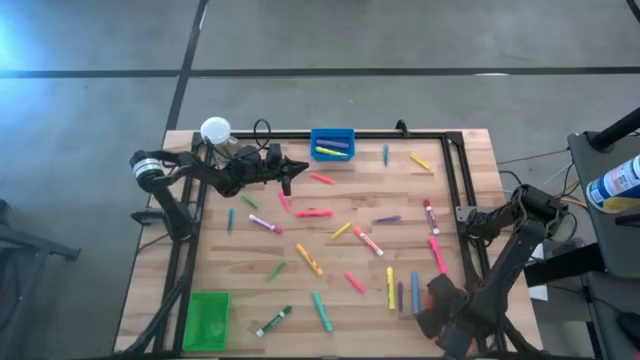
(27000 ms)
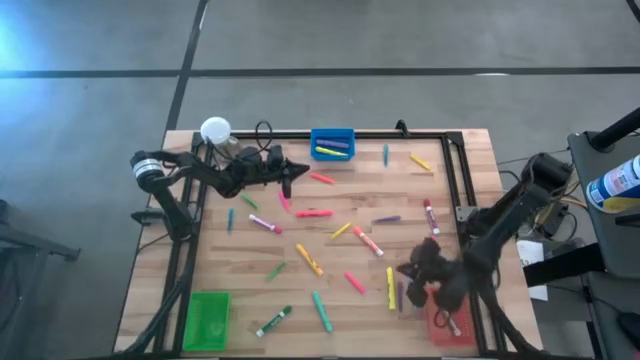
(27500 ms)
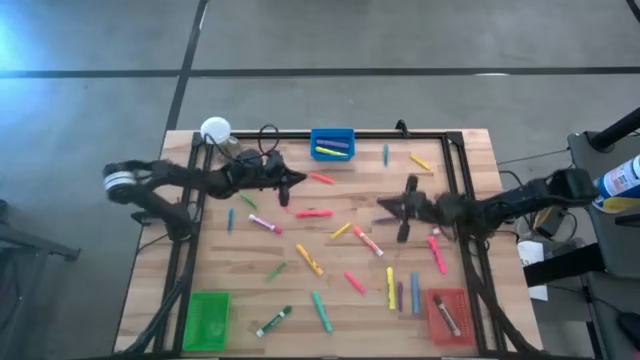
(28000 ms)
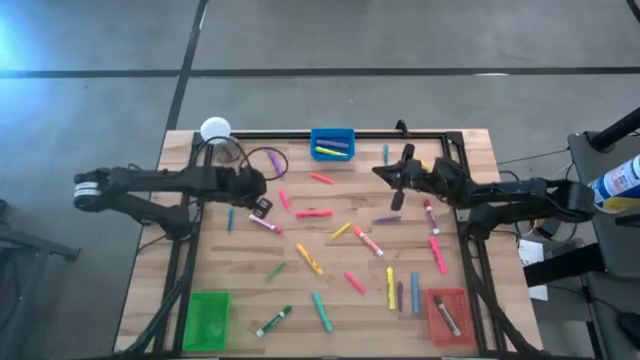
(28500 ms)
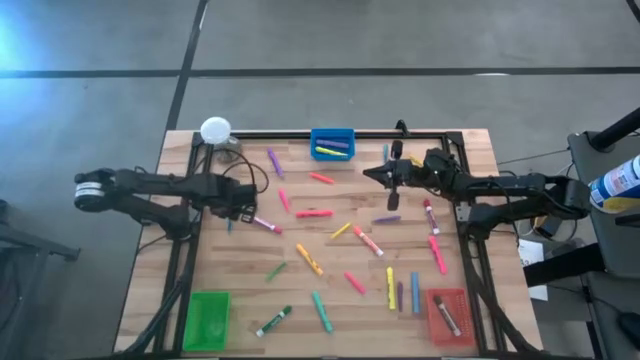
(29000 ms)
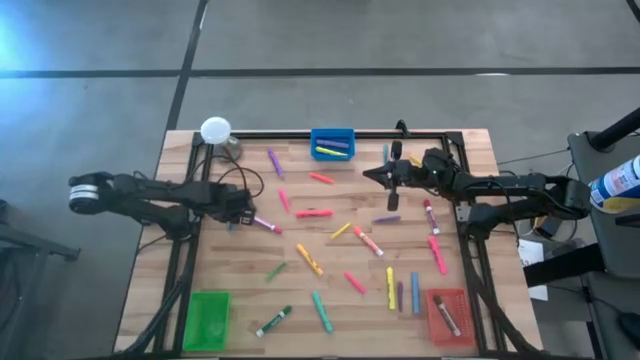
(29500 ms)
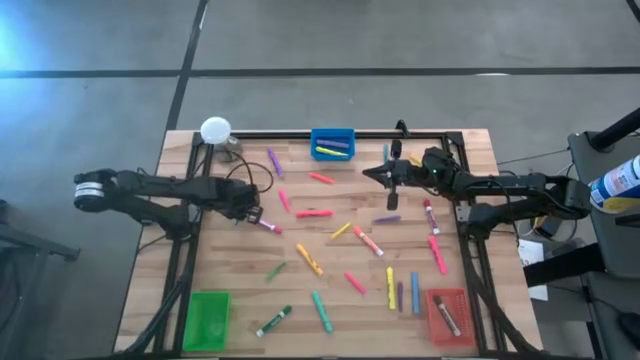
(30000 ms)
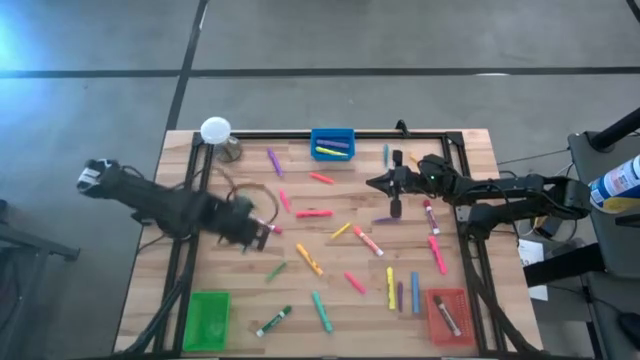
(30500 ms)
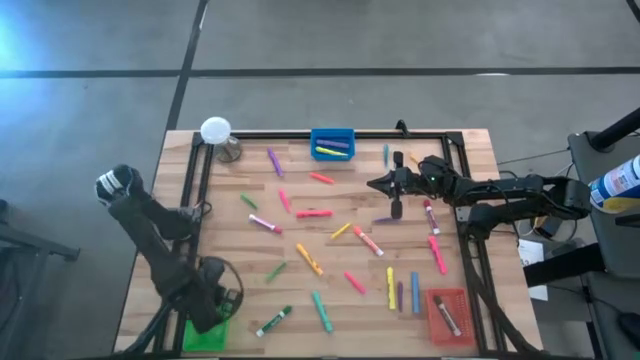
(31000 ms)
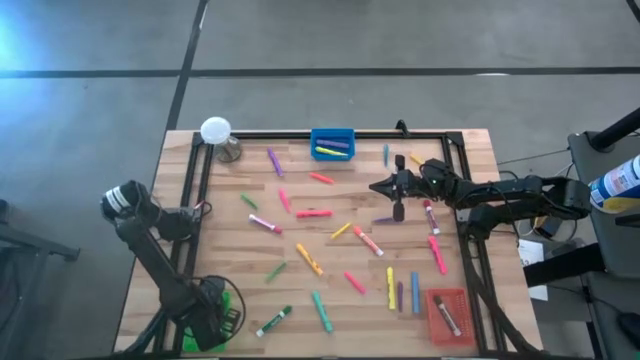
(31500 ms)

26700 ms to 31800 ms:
Task: Pick & Place Markers
Put the left blue pen into the green bin

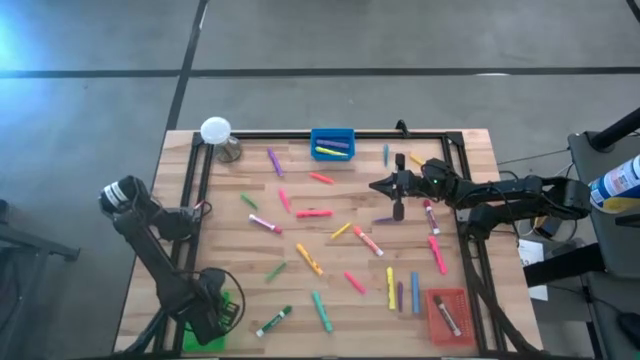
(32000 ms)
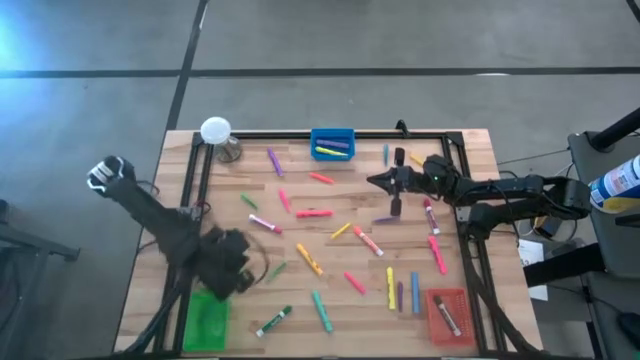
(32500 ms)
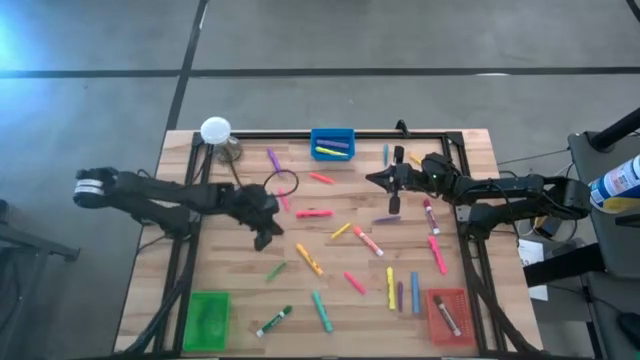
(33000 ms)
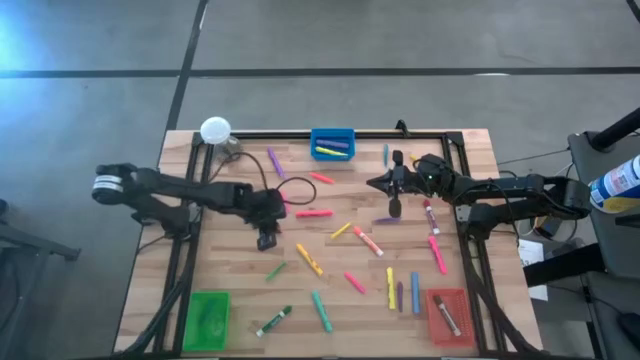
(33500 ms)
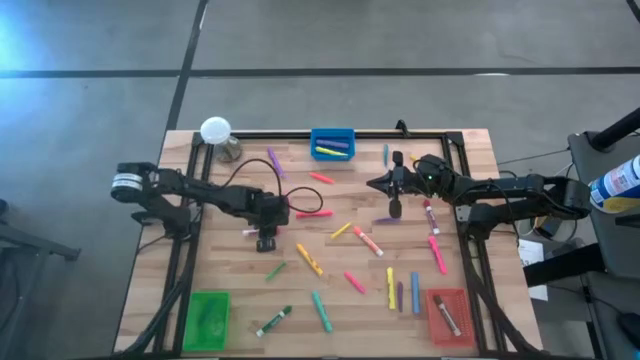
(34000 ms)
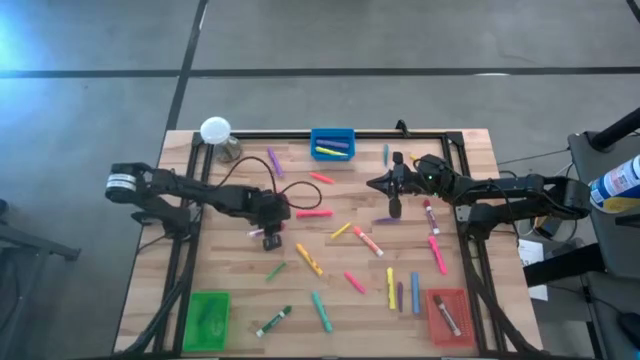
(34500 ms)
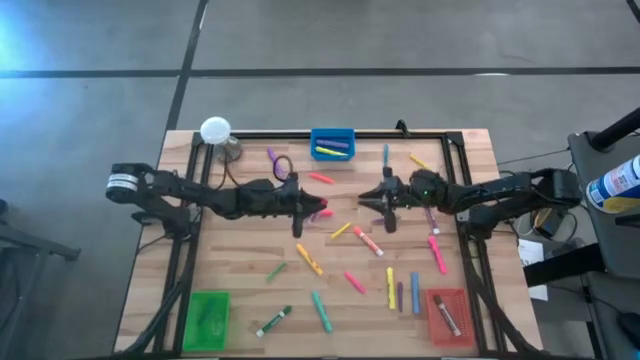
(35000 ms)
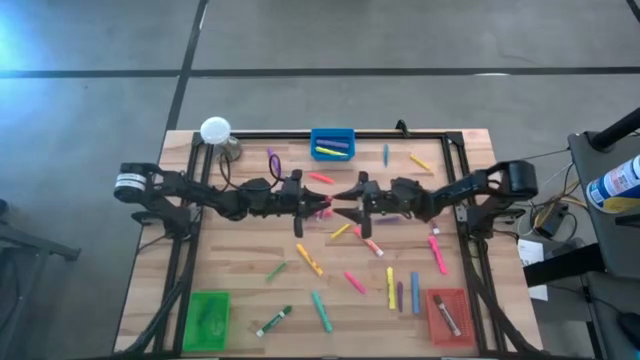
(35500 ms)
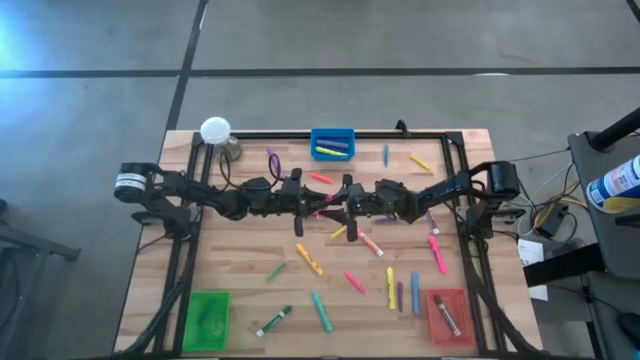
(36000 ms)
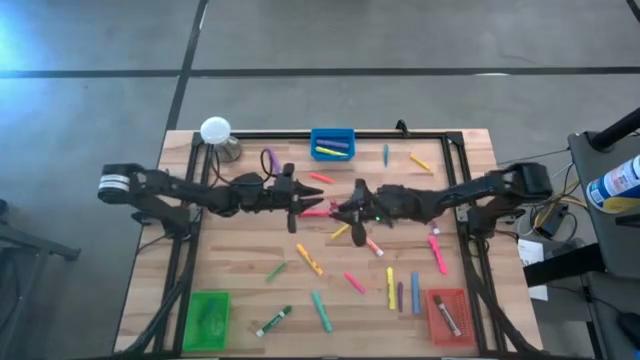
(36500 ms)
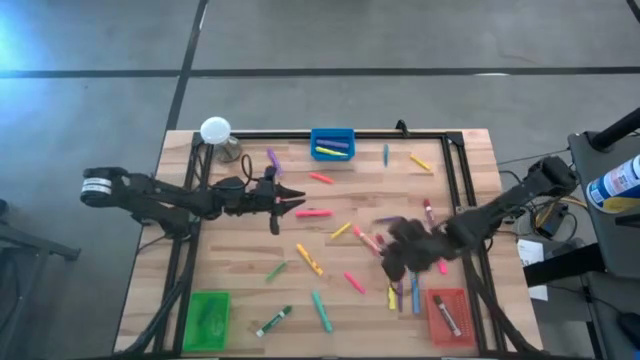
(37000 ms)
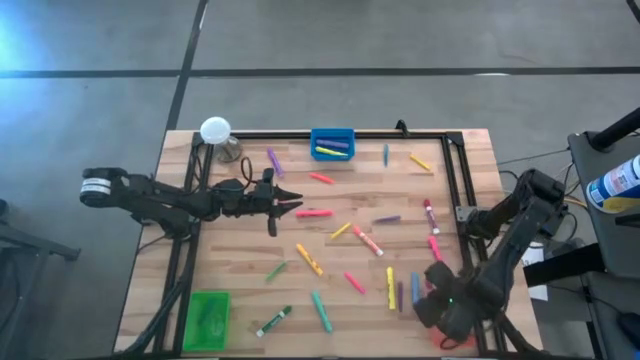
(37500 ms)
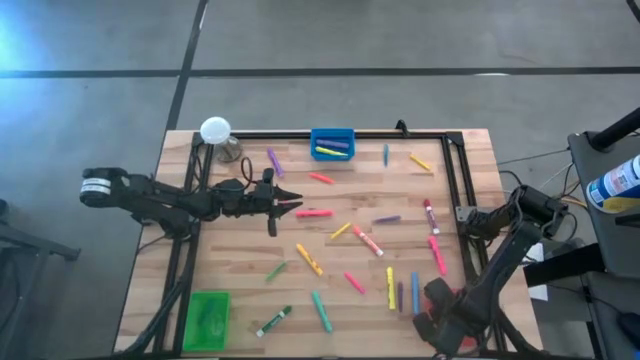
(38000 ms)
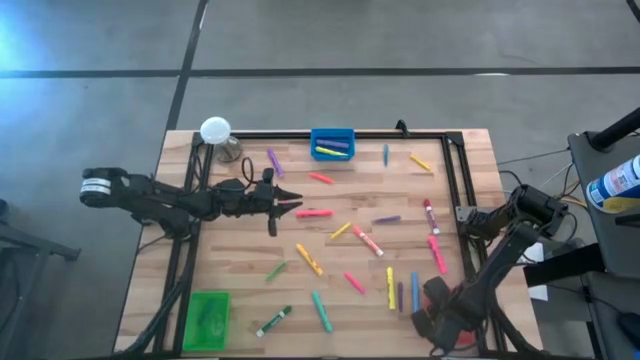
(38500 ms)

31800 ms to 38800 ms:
Put the pink marker into the orange bin

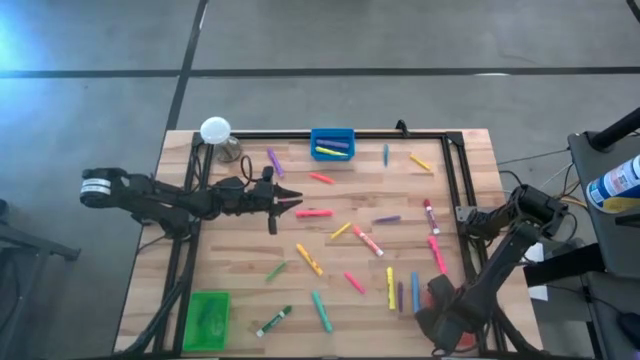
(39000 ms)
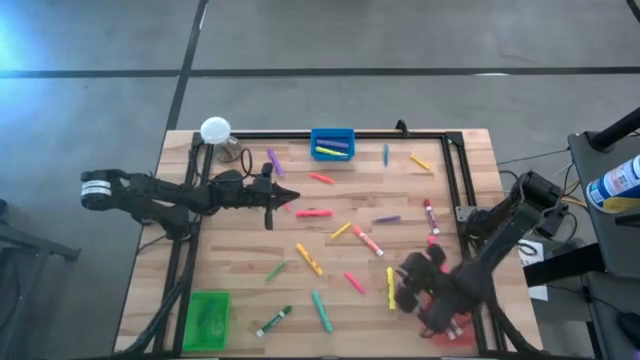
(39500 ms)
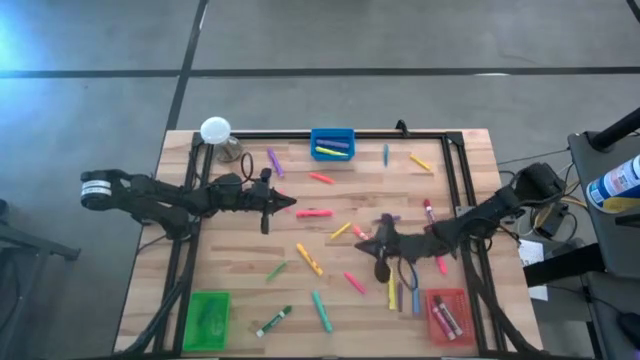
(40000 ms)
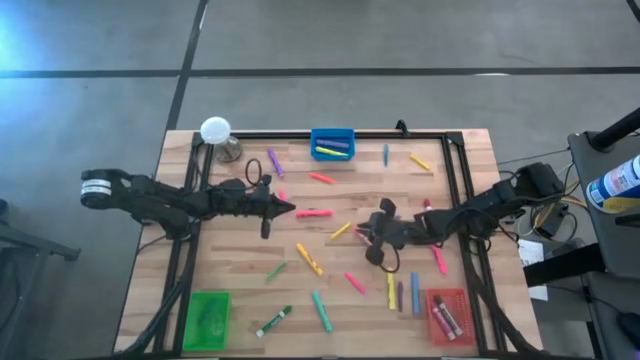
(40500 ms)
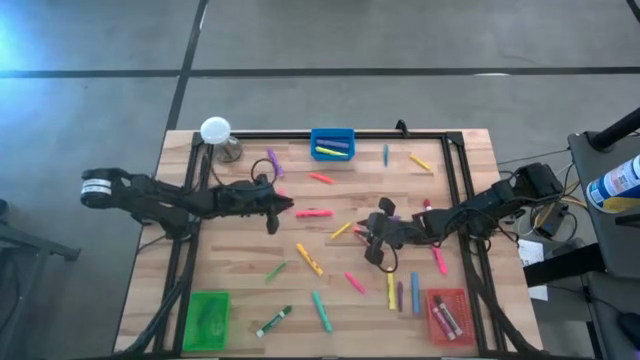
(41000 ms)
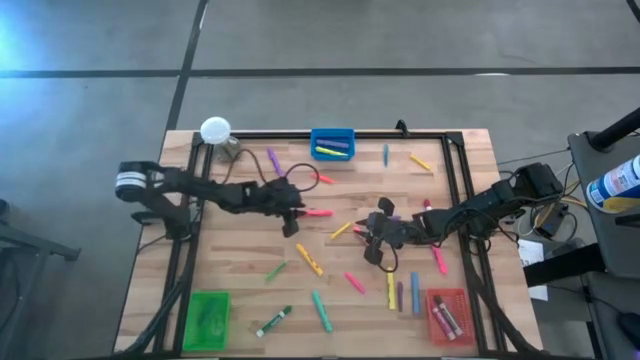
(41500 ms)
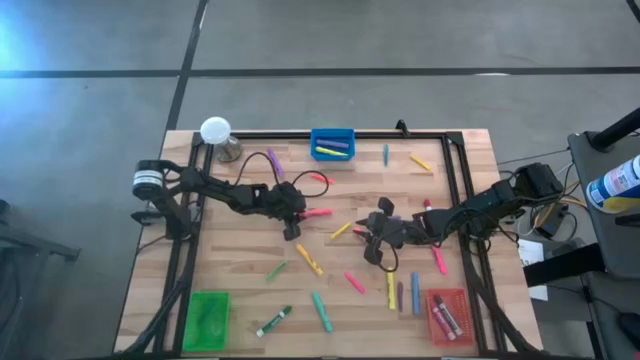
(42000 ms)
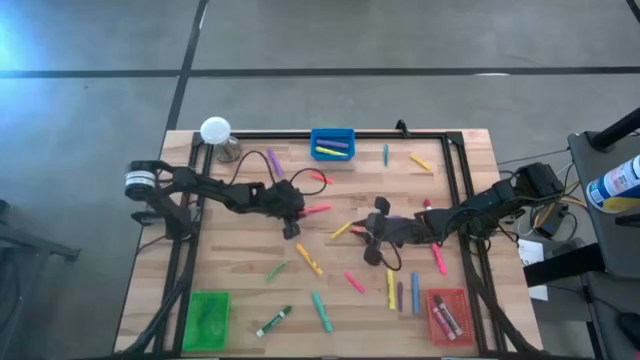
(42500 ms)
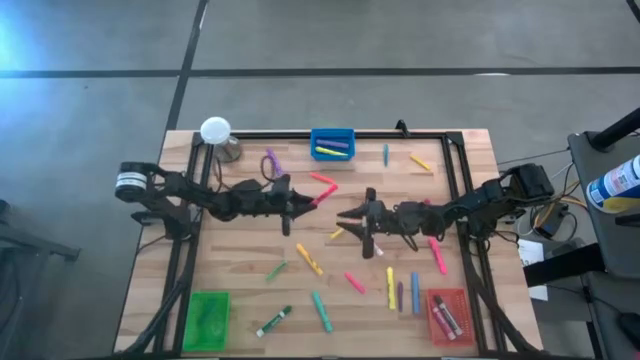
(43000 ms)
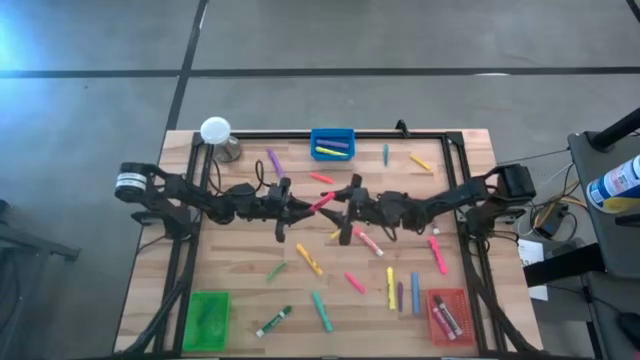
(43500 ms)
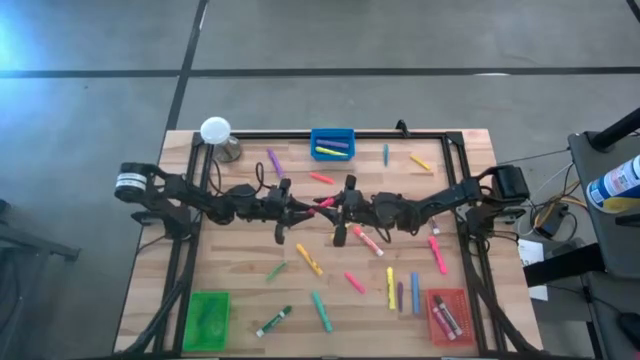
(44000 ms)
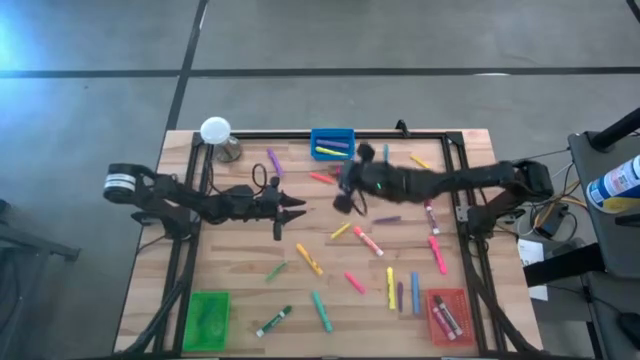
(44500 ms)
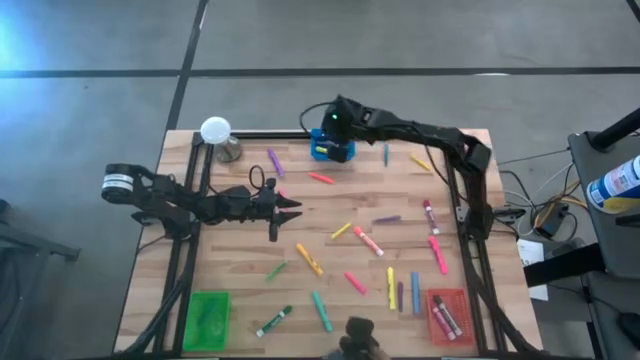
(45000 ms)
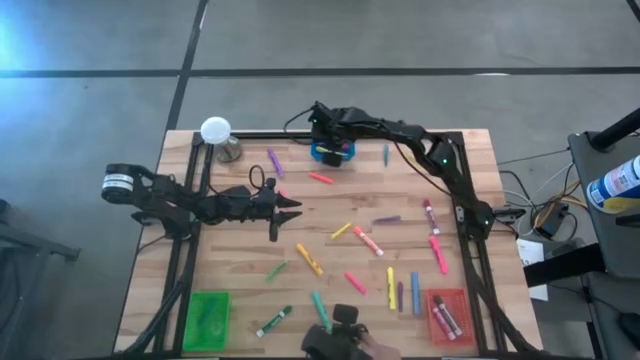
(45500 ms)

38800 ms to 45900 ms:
Put the left pink highlighter into the blue bin

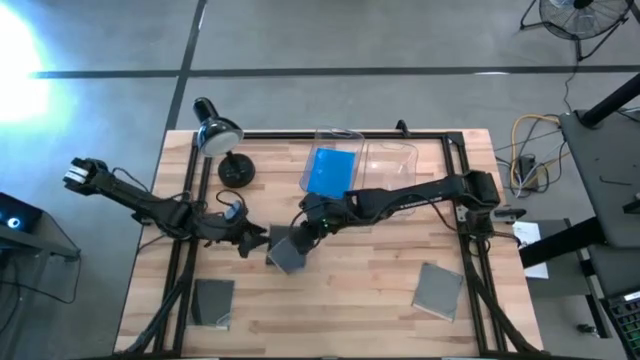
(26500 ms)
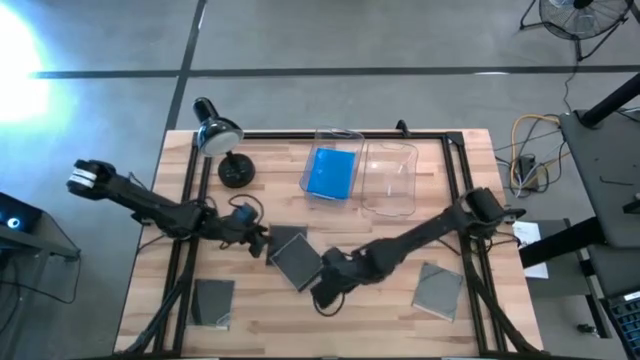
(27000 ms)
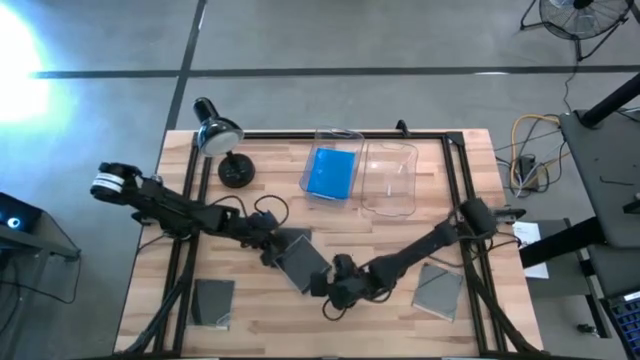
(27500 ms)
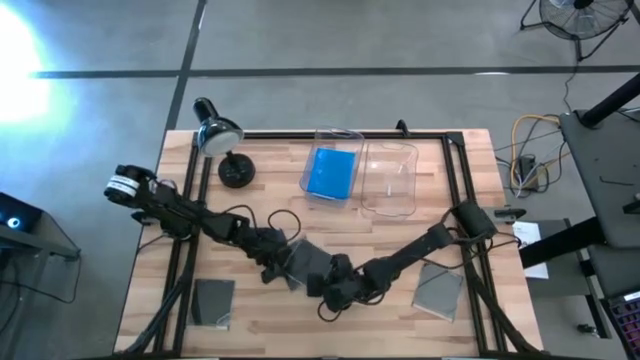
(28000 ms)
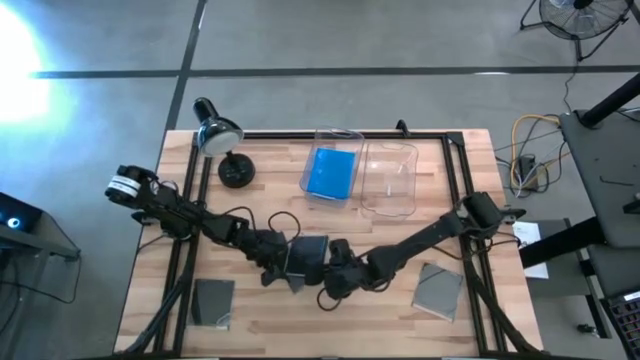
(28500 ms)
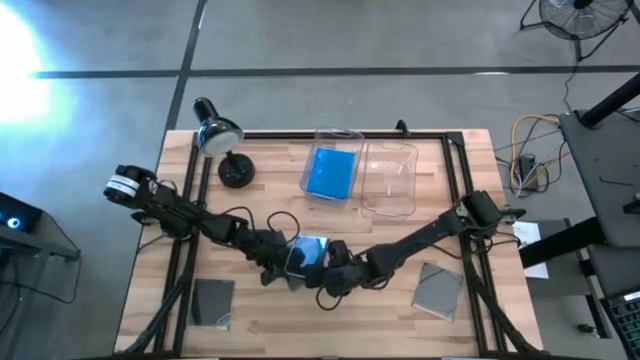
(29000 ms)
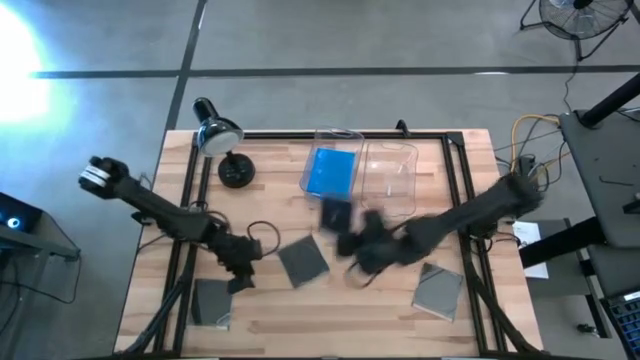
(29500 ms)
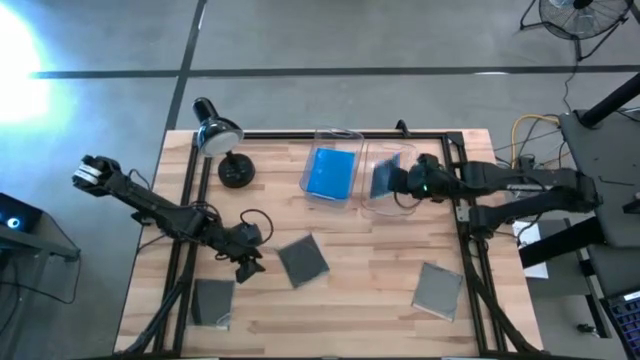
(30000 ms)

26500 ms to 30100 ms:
Task: Pick & place jewel cases by type
Put the black CD case into the right transparent bin
